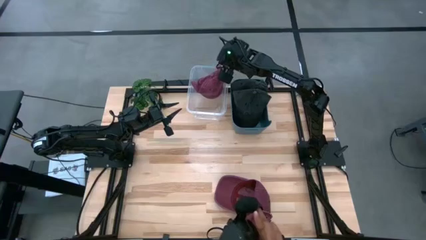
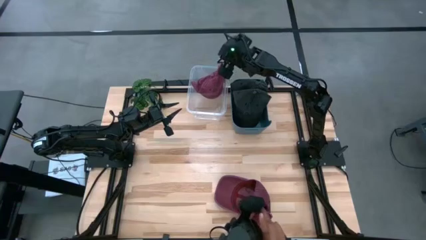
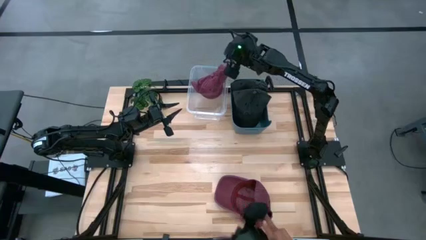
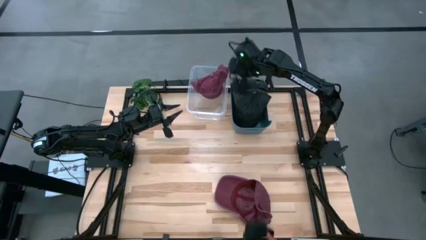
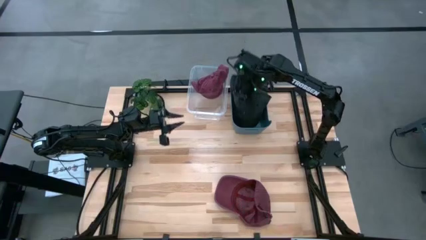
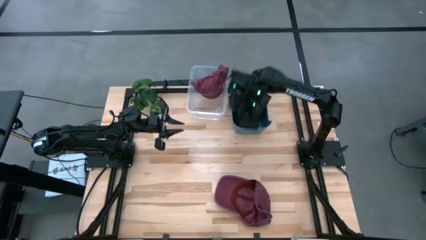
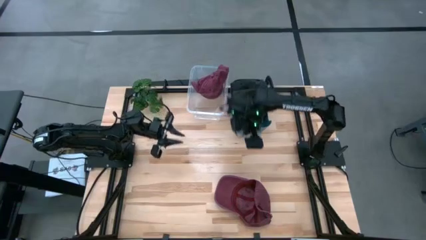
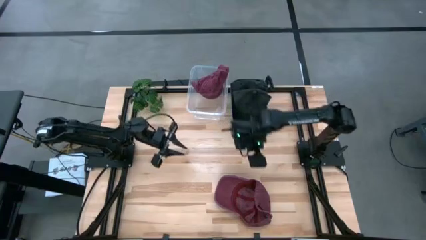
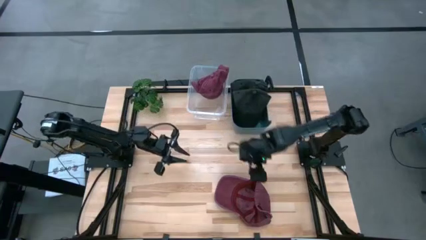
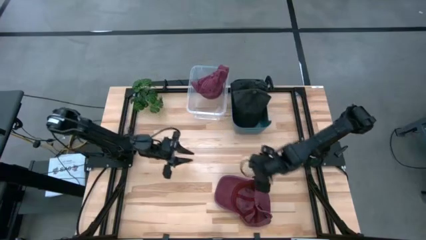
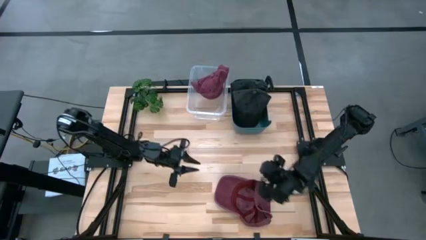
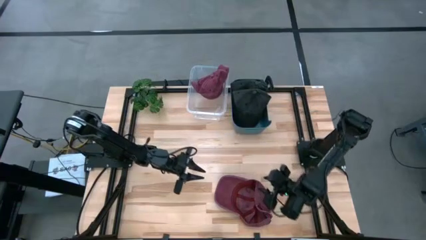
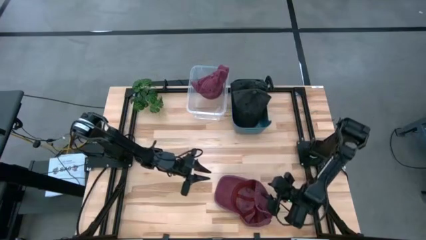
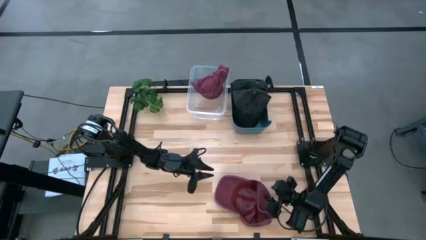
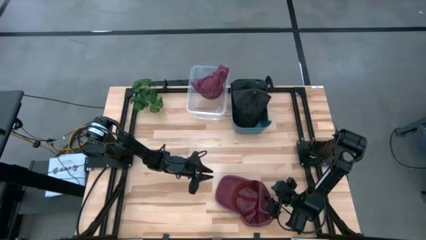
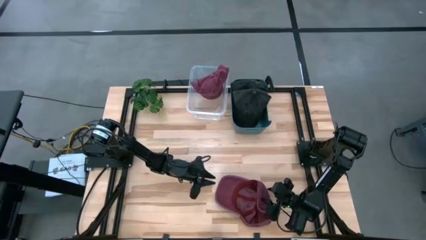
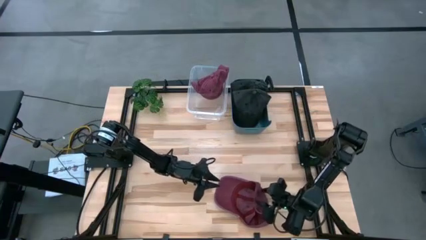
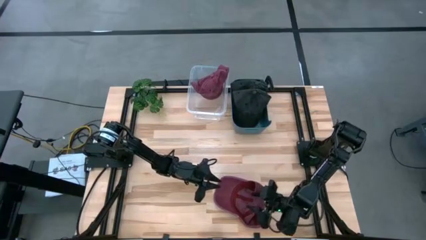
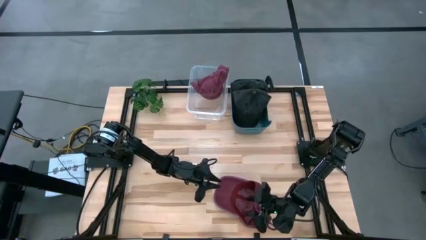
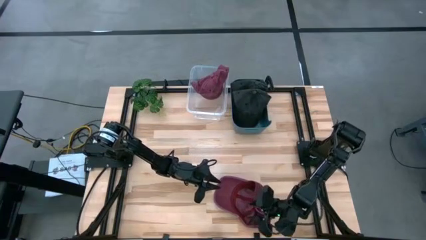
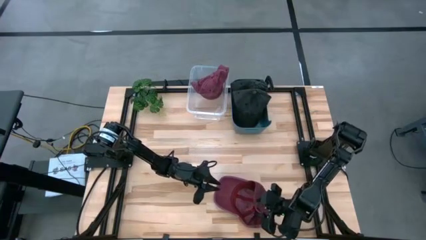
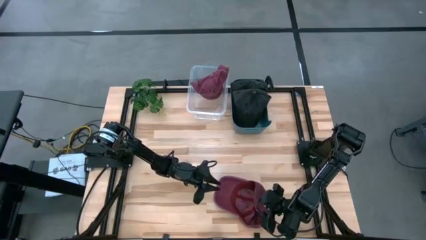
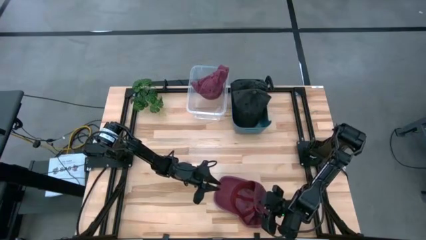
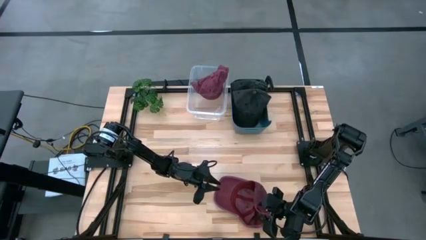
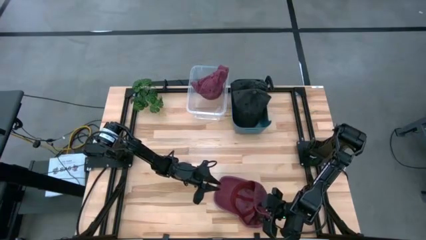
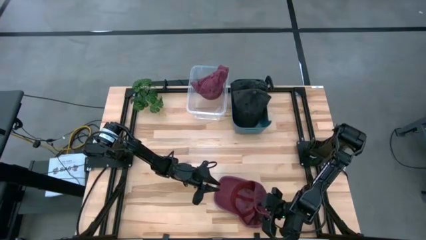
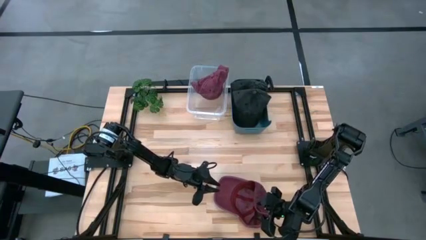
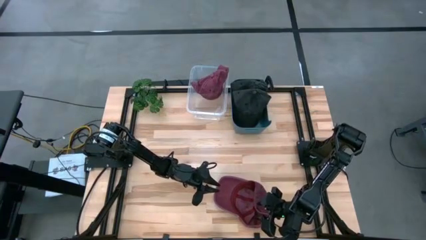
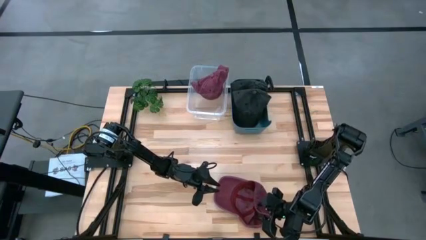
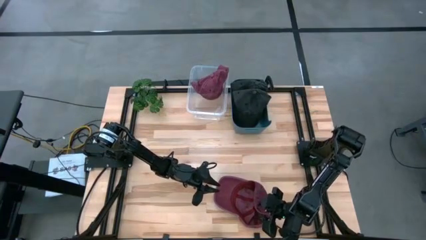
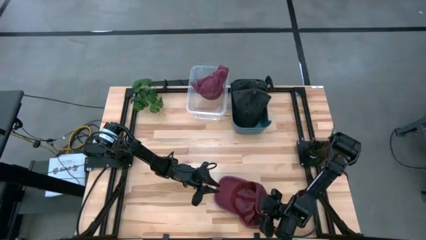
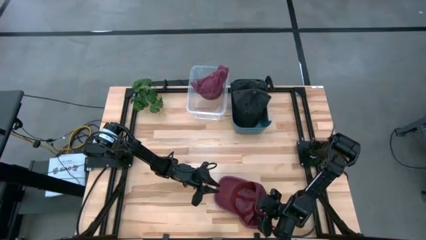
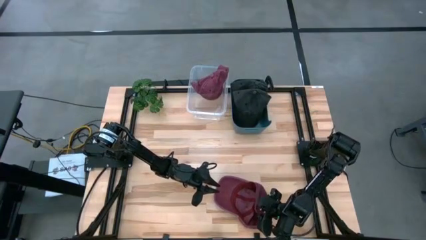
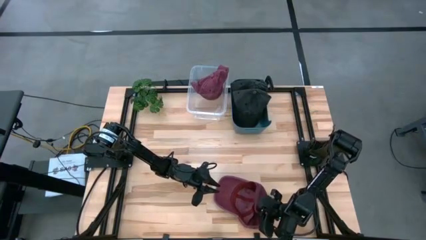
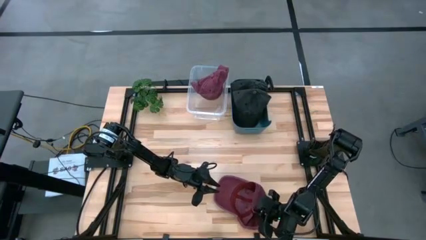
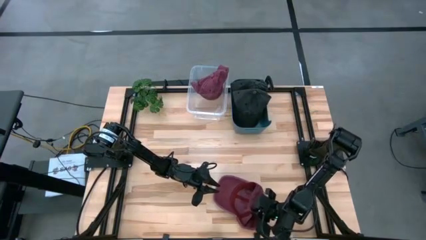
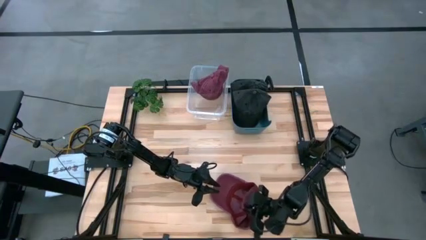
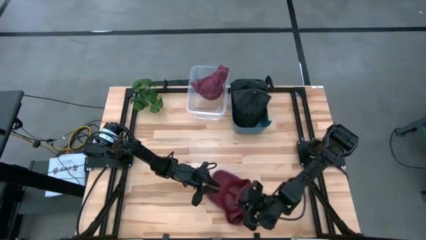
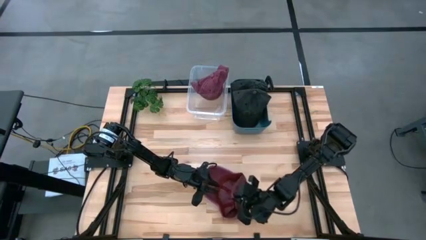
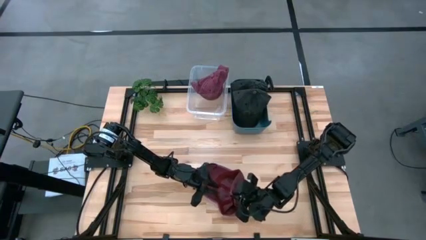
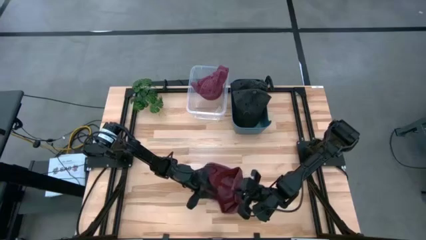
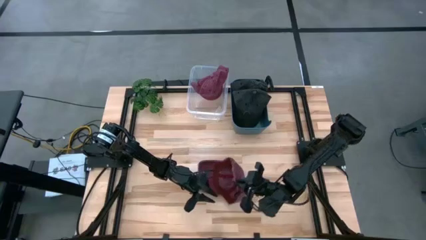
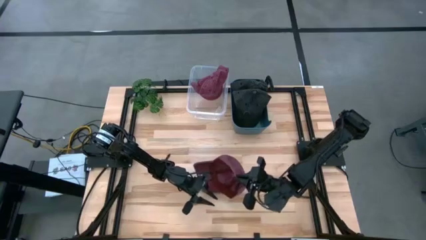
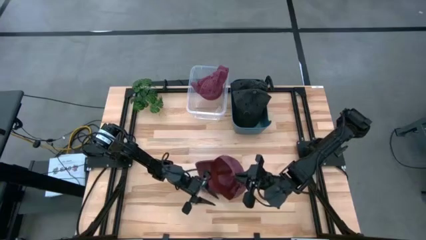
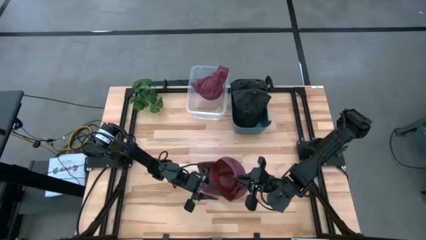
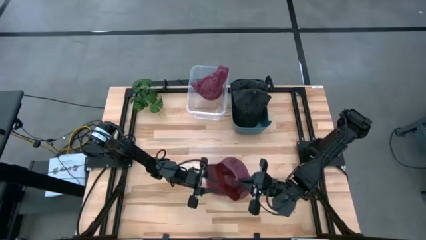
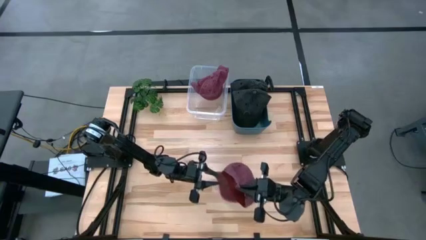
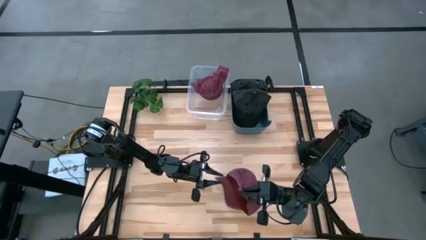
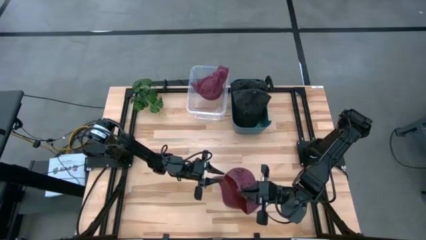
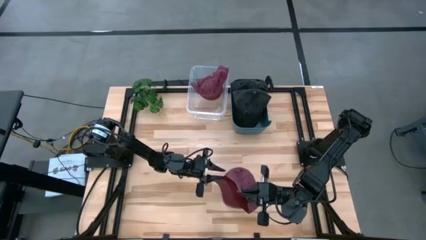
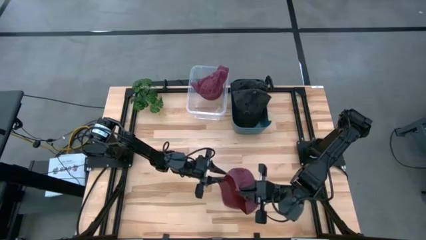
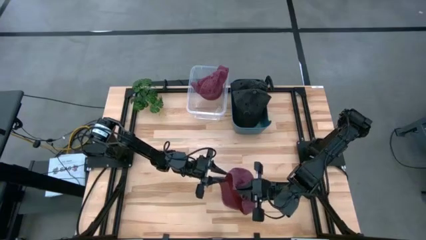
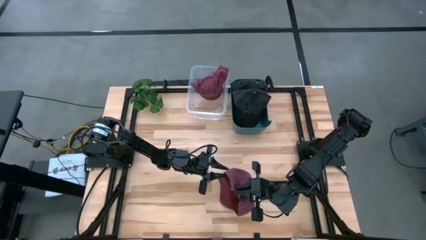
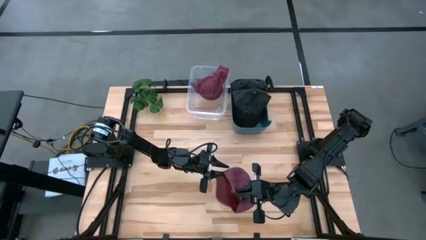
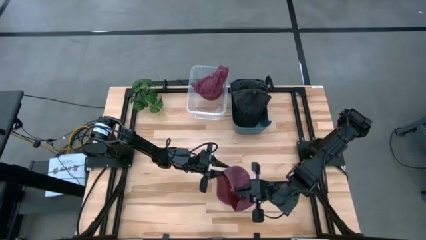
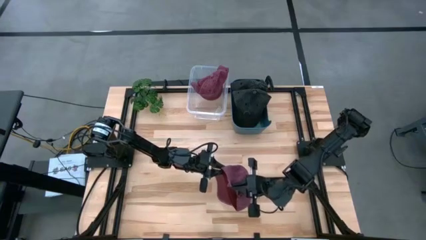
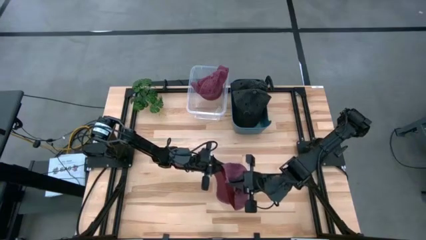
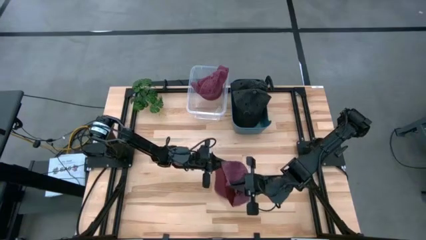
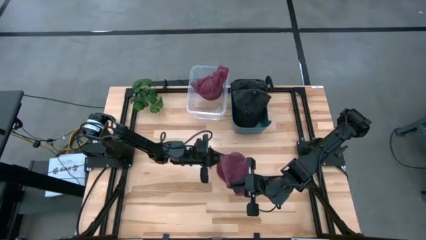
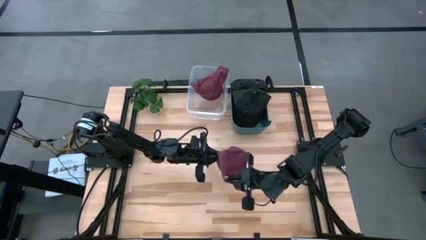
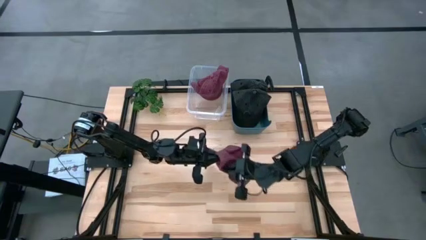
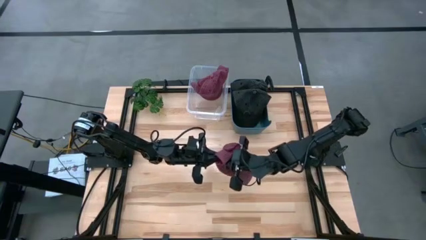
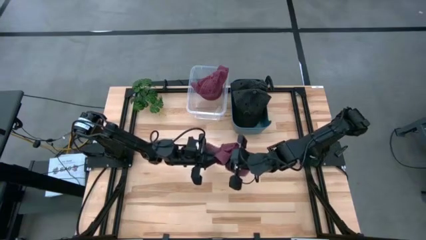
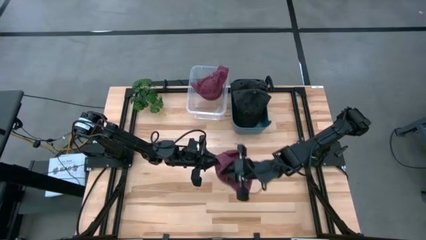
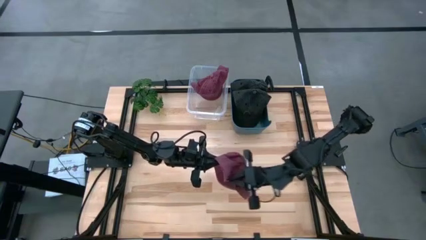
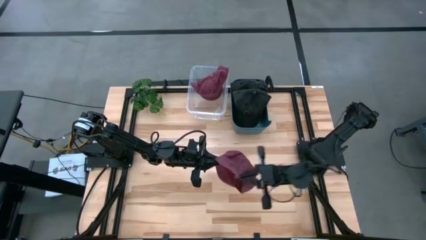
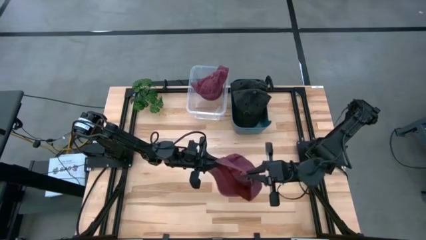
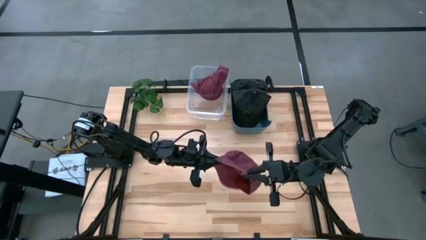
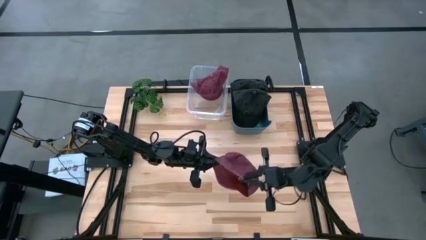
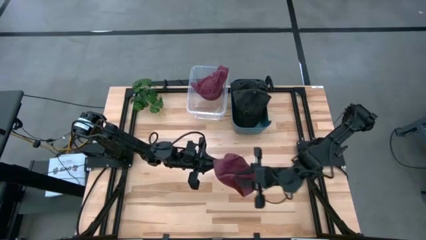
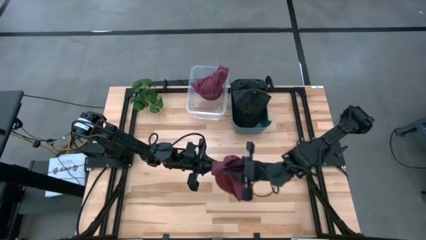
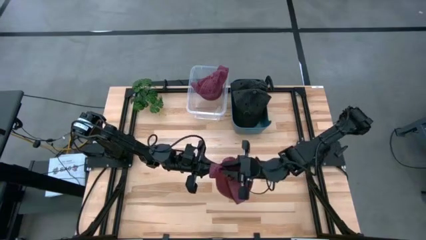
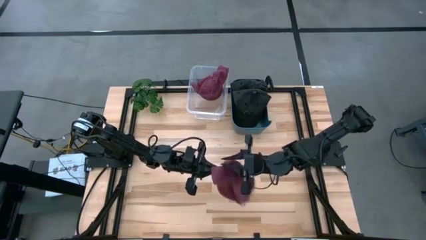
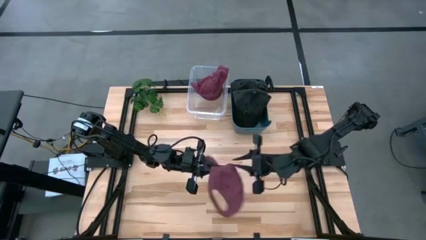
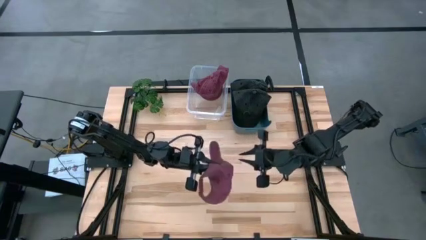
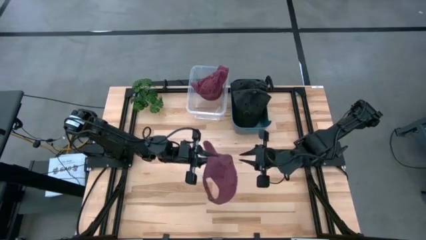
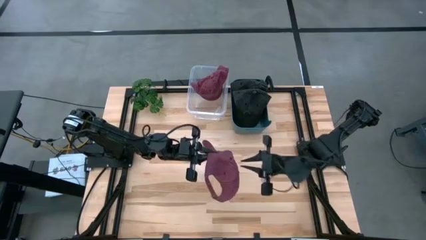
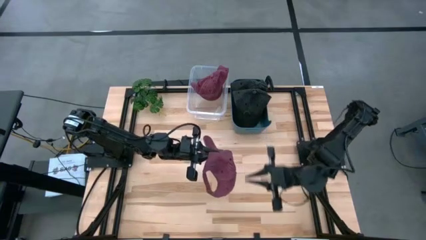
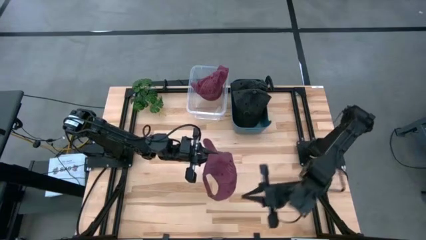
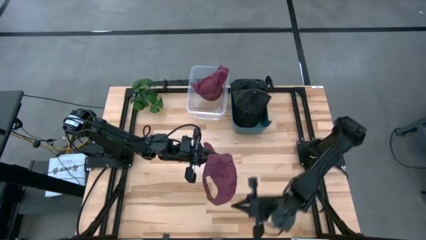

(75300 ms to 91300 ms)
Task: Pick & Place hat
Put the red cap into the transparent bin
